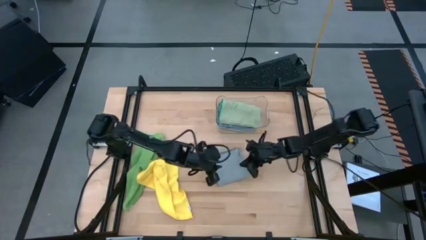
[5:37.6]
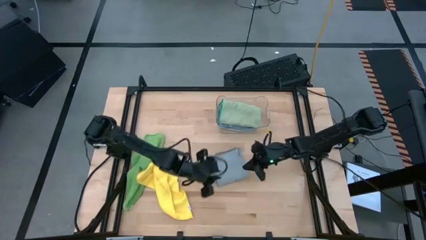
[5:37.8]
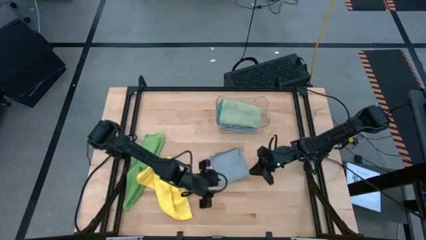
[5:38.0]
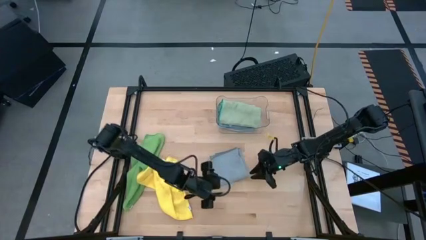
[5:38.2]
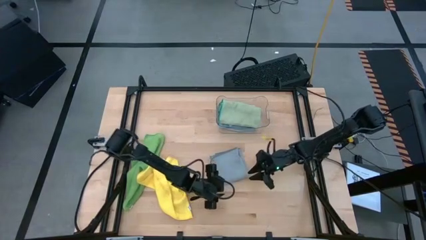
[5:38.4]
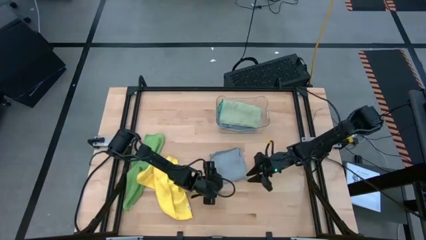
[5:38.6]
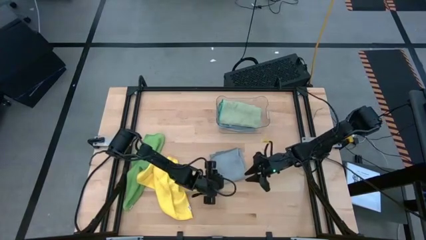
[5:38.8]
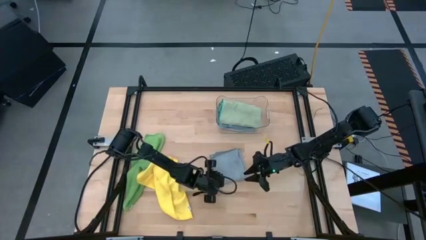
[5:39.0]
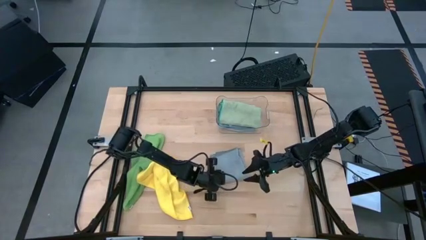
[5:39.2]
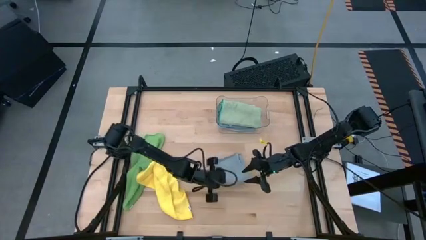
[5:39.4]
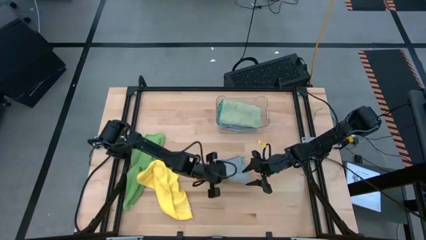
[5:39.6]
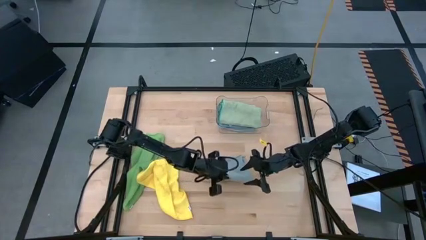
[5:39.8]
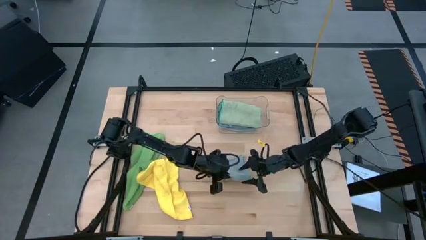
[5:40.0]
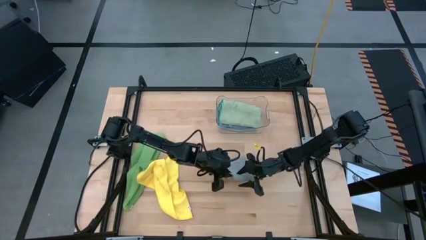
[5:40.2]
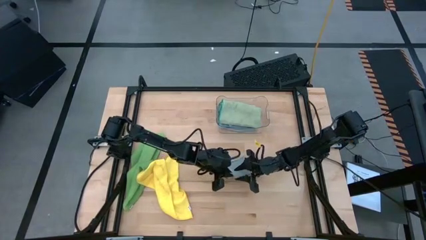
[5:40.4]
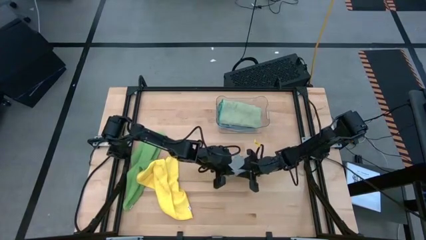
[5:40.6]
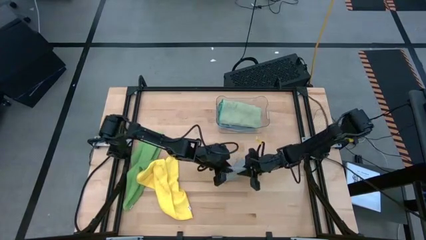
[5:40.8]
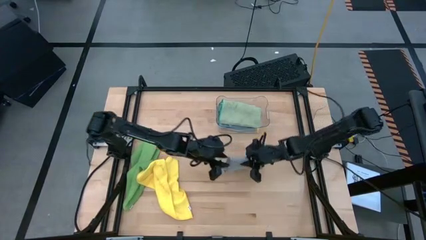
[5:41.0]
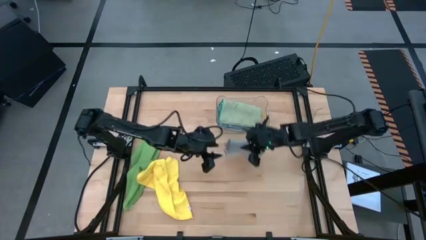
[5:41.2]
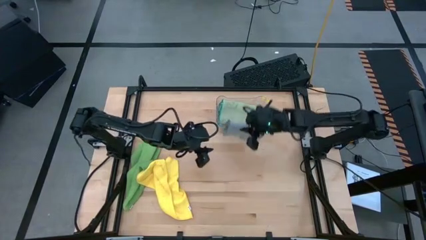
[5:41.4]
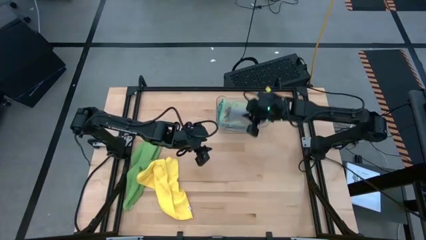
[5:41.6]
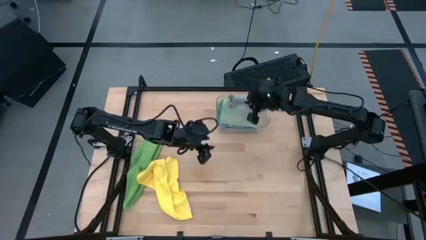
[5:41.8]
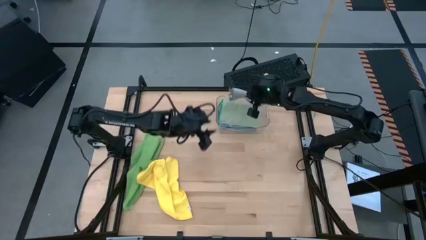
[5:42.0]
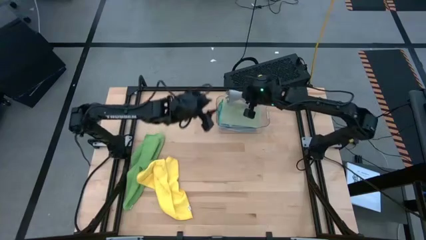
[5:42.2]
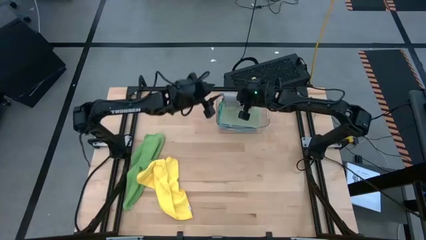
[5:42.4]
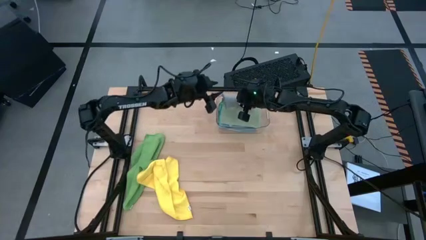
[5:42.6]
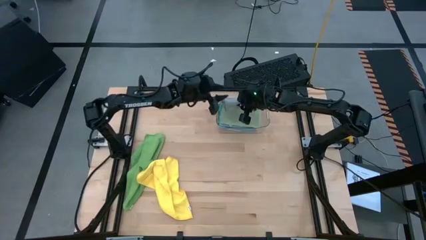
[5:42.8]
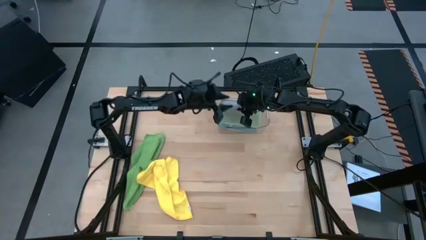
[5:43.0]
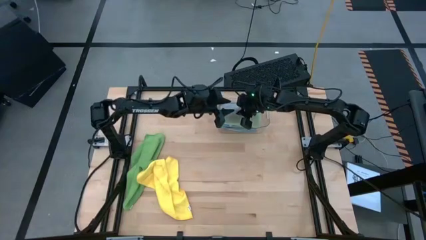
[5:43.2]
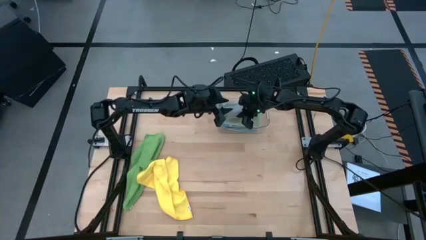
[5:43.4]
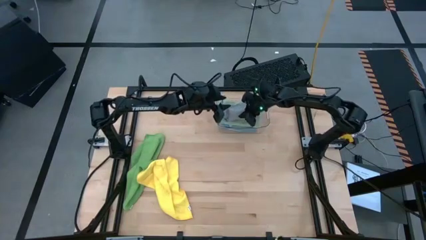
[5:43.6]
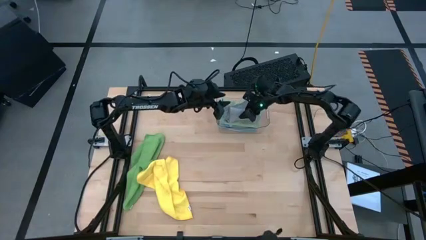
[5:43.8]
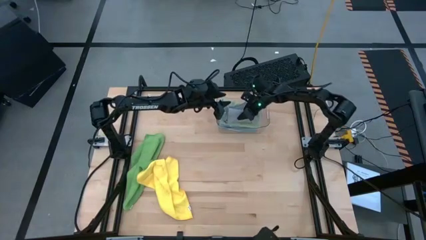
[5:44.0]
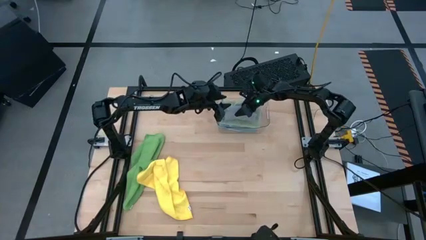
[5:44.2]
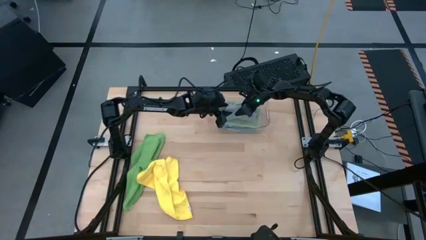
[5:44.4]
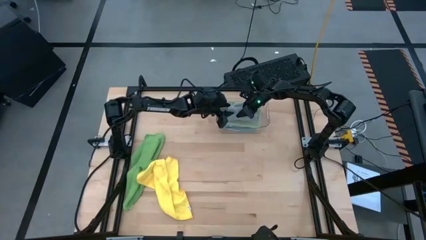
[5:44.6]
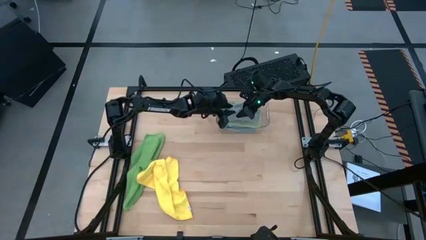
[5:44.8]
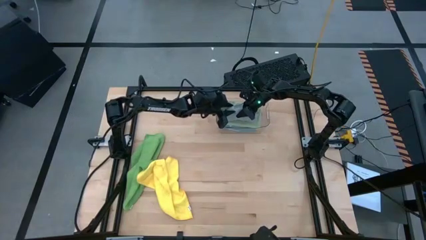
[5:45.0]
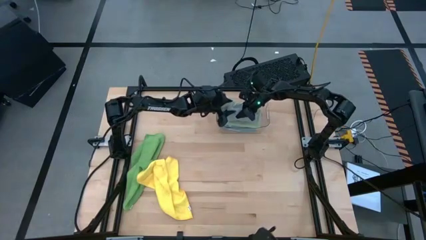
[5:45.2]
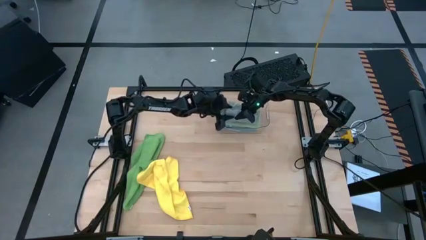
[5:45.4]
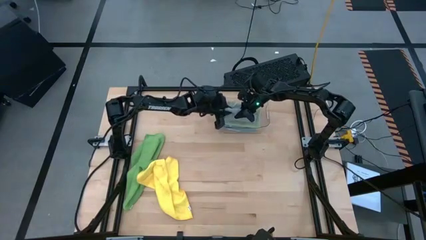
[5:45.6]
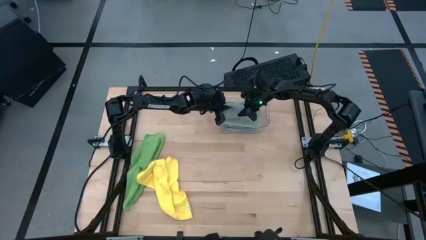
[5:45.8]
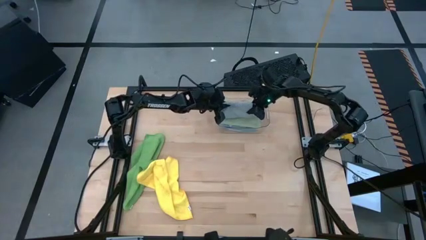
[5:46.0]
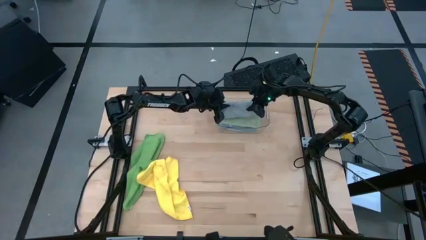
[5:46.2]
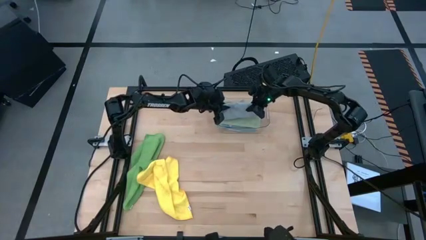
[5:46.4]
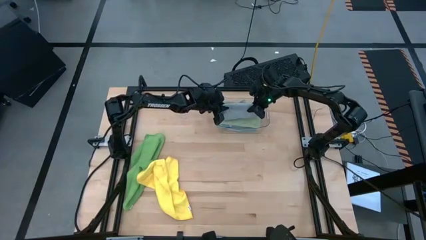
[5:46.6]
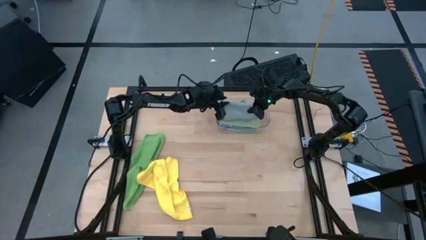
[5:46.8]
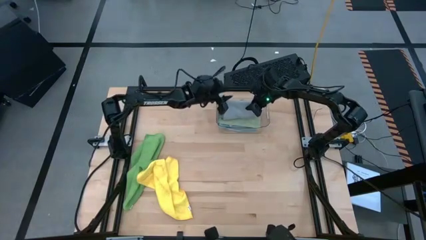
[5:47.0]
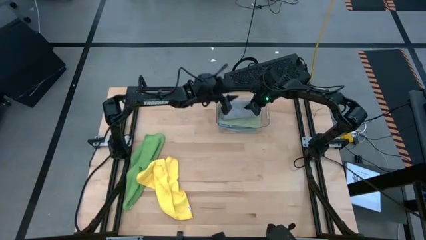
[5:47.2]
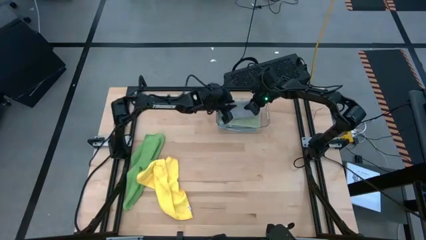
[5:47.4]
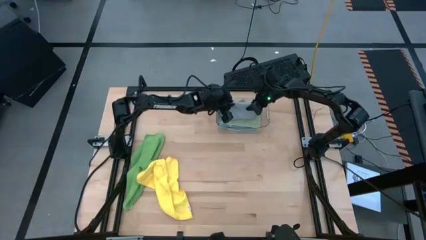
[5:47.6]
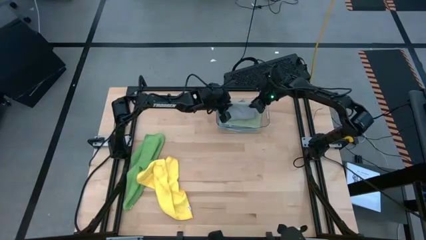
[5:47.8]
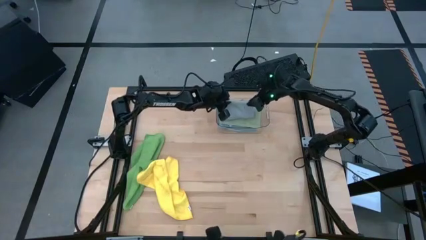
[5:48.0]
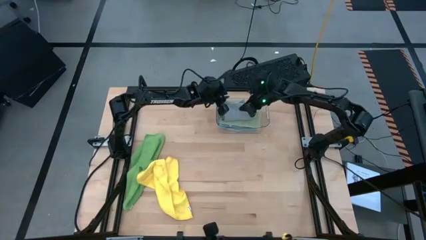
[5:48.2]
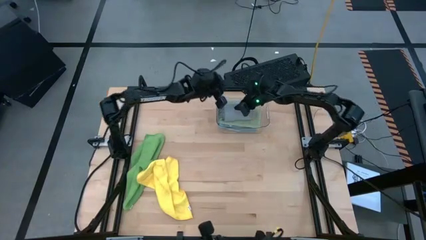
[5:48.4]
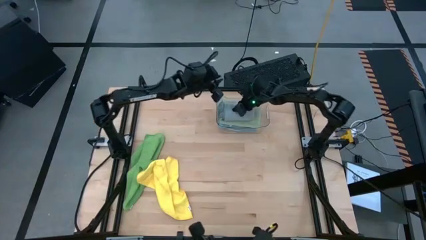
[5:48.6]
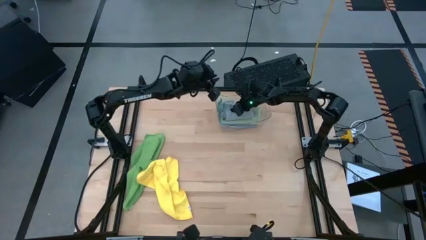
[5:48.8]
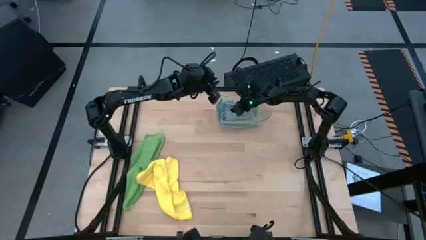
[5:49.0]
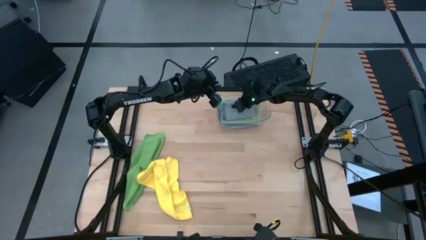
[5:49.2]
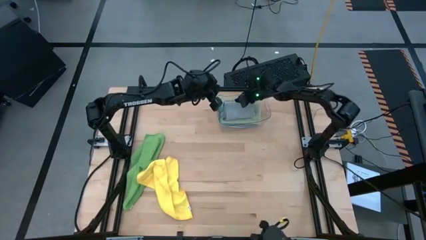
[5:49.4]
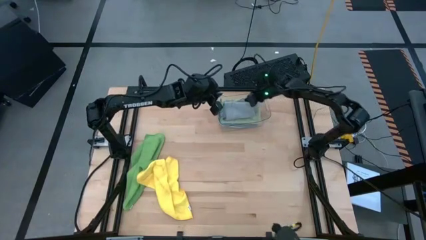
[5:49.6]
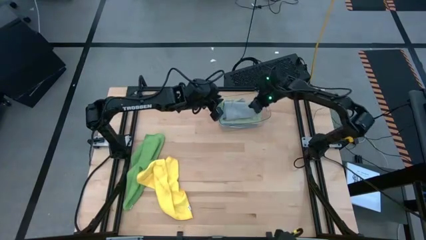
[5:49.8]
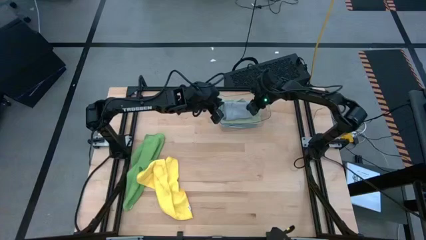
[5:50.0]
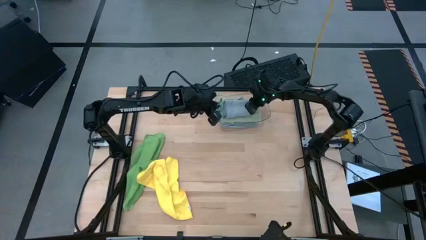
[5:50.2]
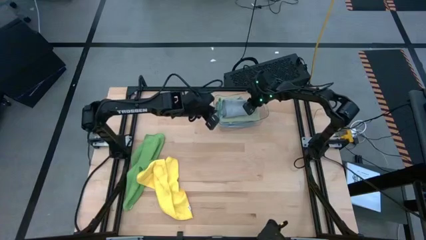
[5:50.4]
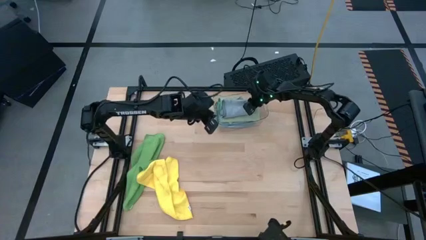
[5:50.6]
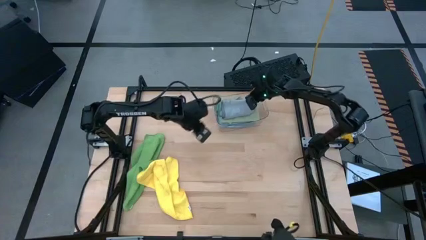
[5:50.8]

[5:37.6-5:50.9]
Task: Fold microfiber towels
Put the gray towel in the transparent bin

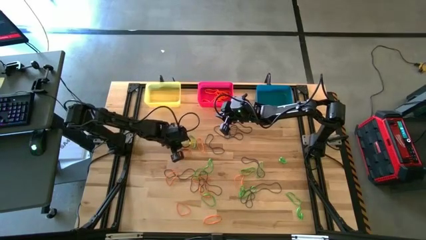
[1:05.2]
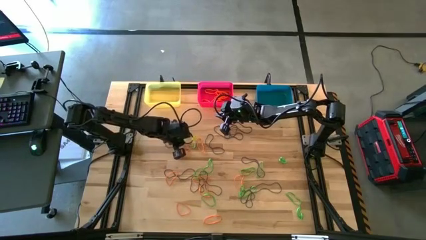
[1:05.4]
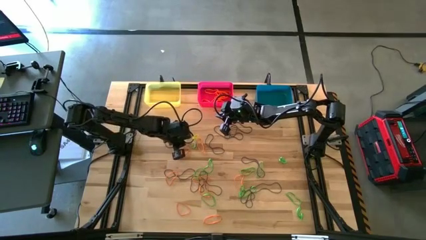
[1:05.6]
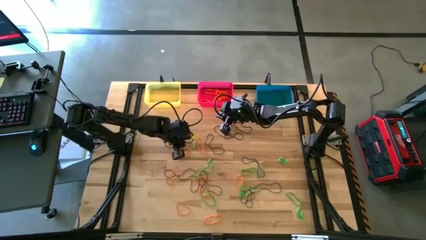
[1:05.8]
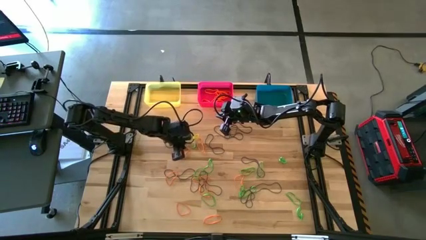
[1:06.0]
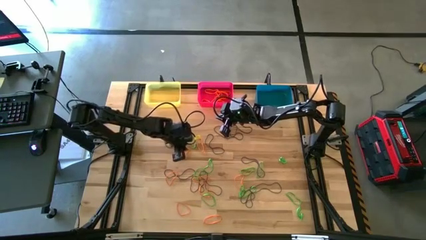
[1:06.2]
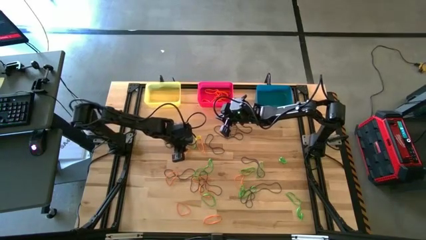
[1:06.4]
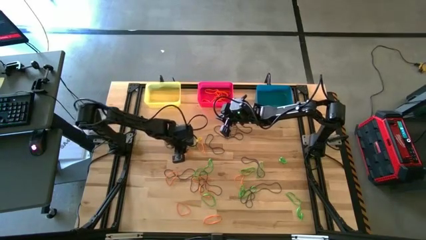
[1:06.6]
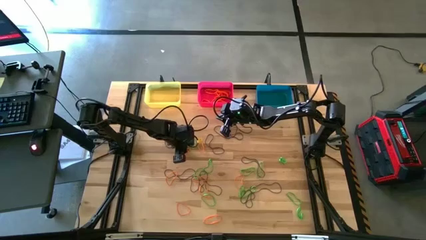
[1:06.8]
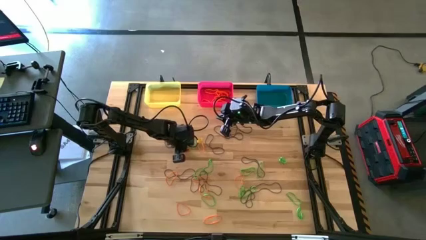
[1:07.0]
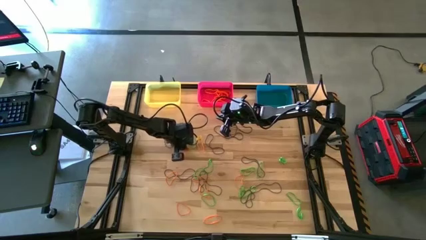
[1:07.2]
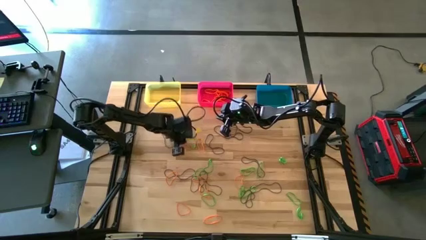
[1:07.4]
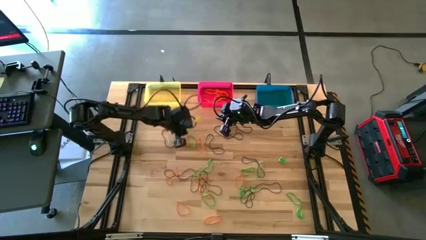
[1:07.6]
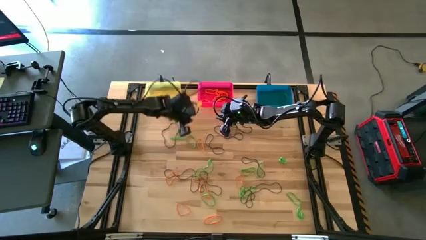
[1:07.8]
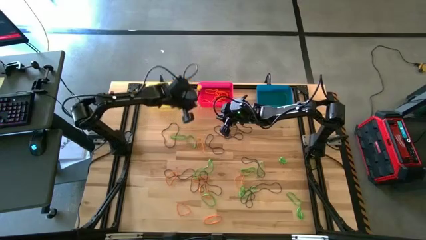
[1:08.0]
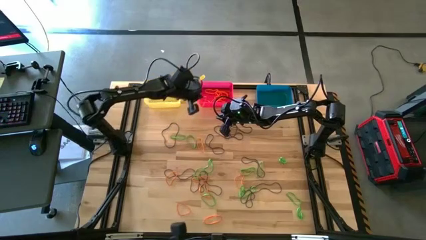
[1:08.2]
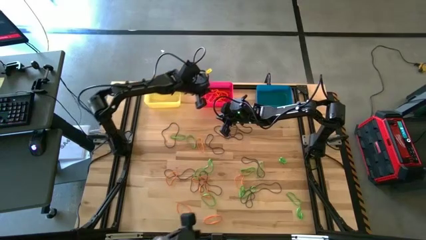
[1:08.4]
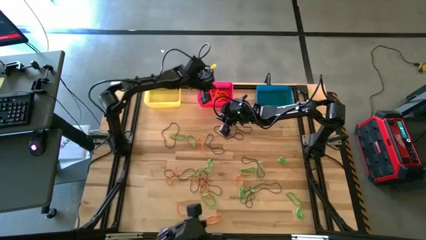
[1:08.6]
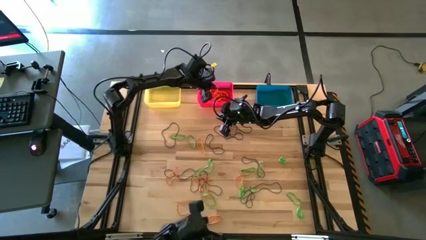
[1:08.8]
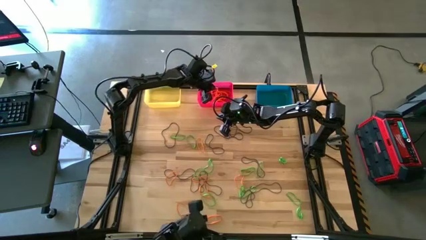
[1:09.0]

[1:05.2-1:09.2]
Task: Sort rubber bands into baskets
Put the orange rubber band into the pink bin
